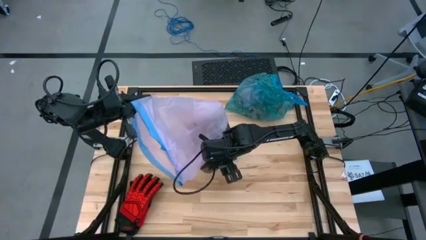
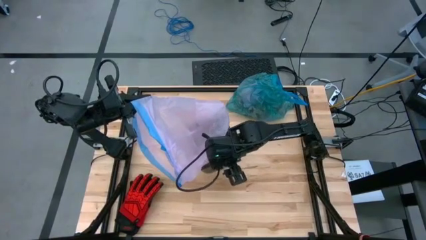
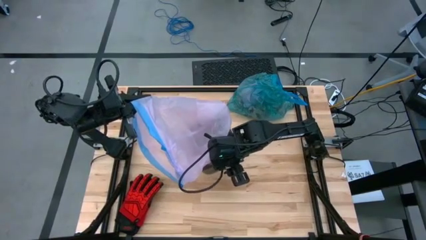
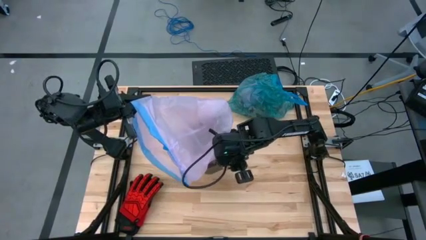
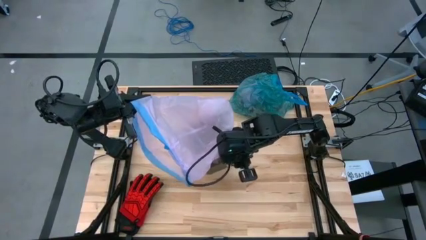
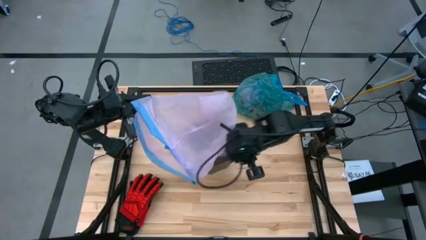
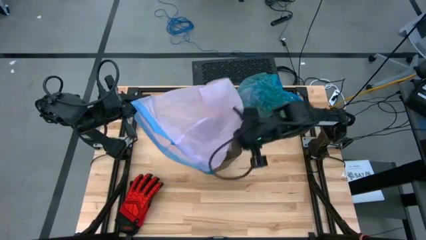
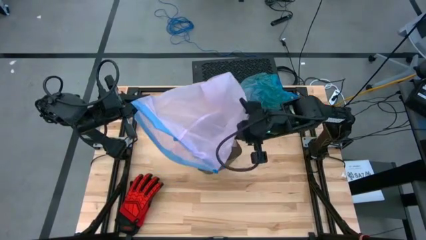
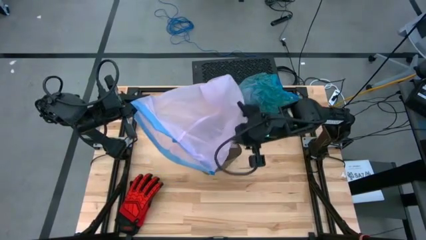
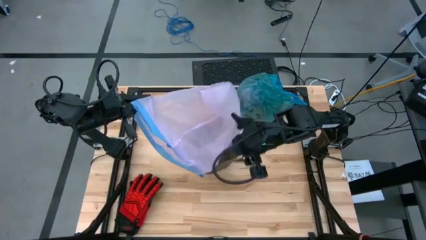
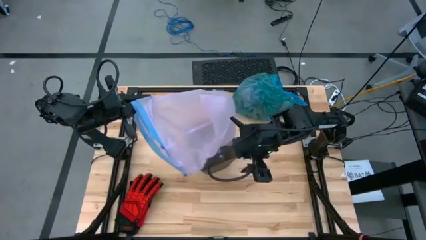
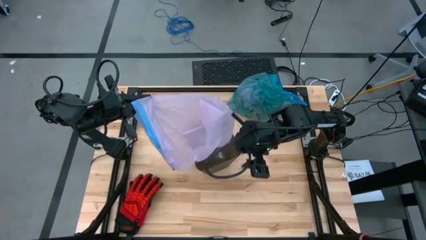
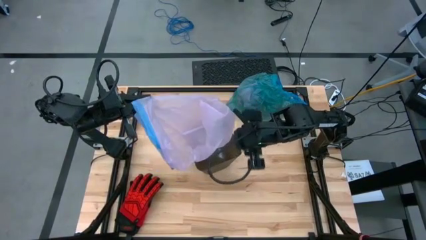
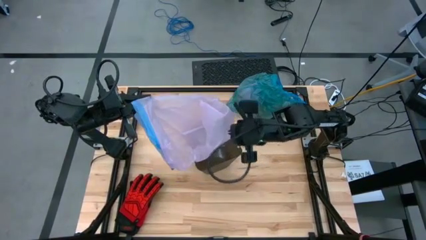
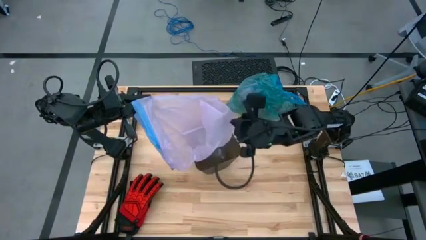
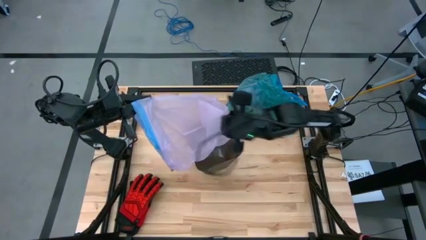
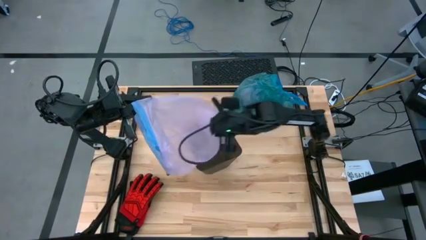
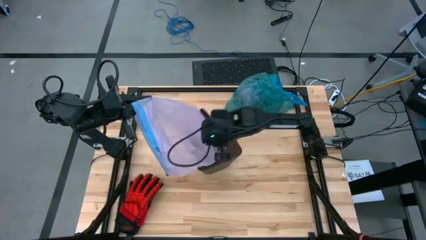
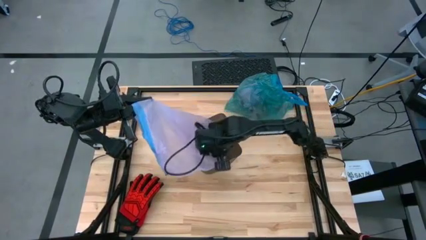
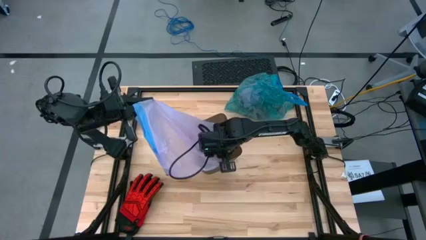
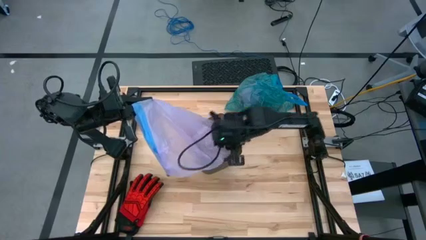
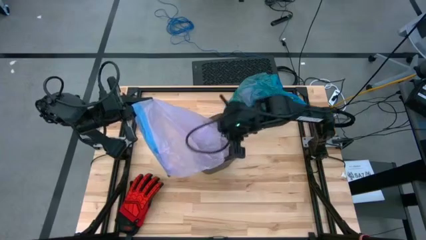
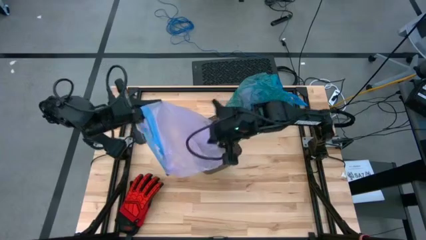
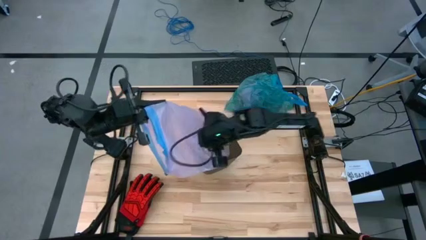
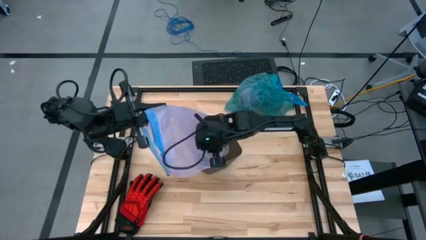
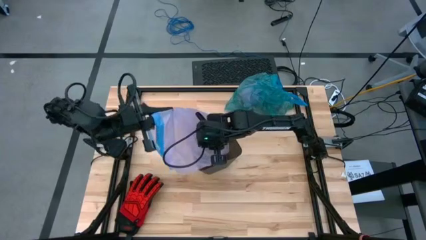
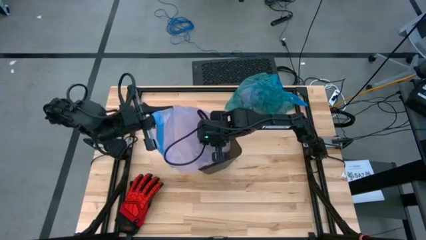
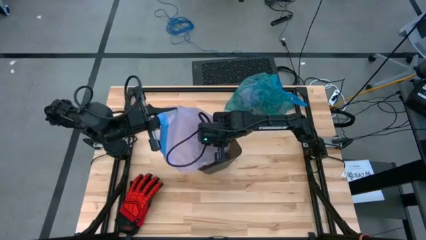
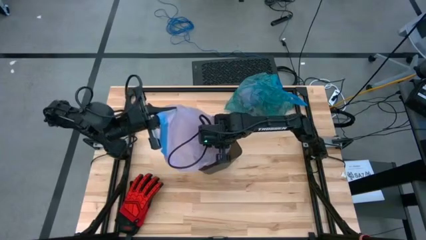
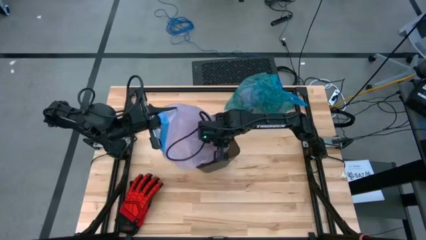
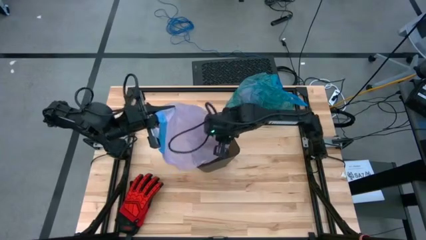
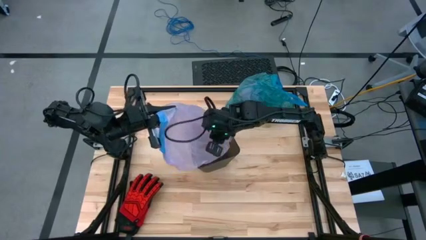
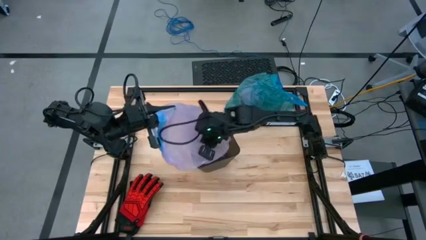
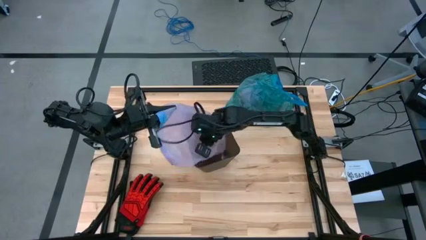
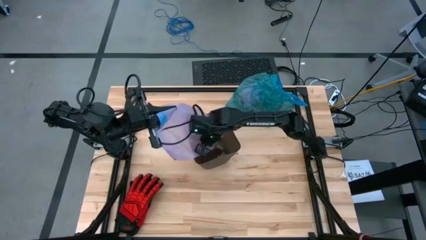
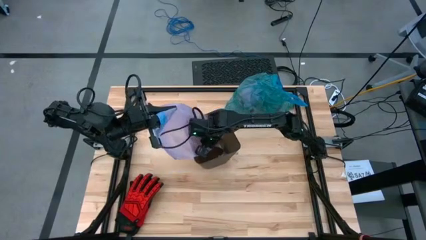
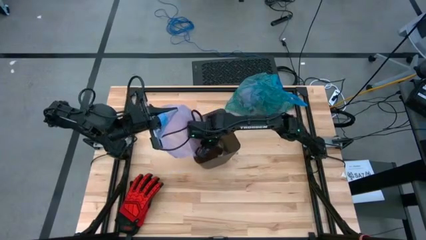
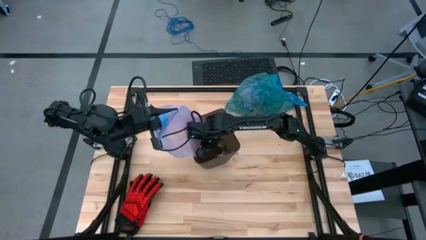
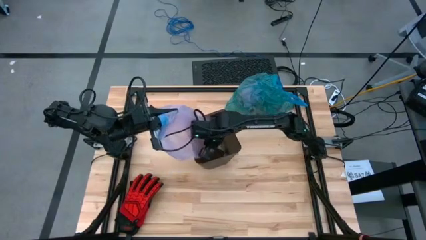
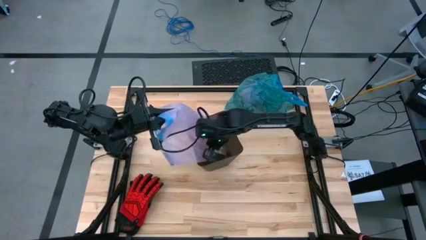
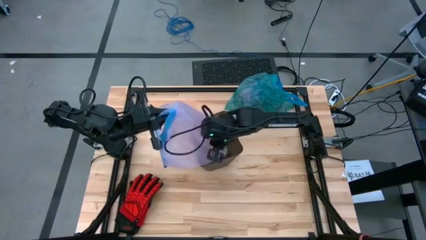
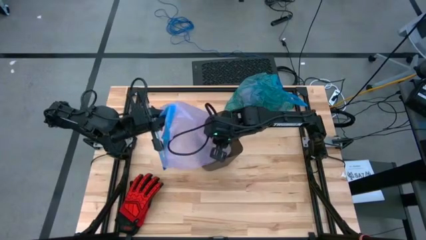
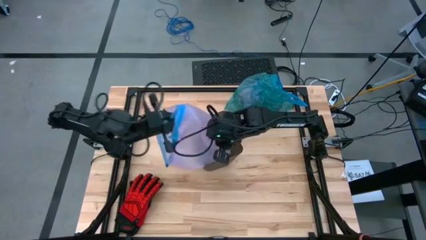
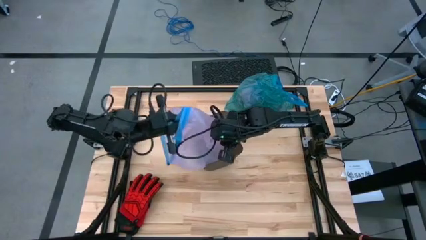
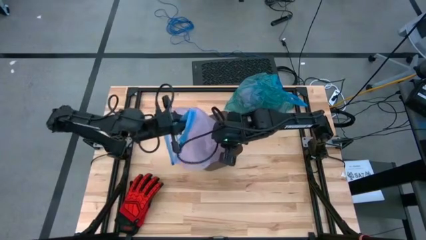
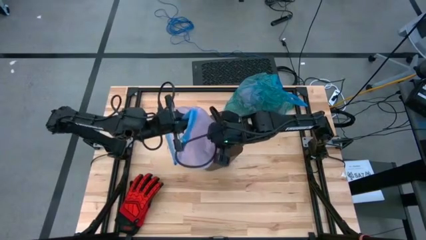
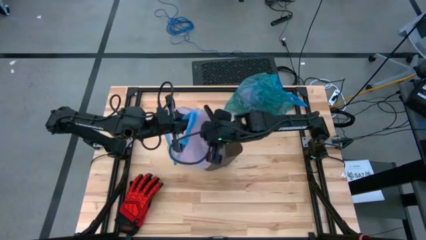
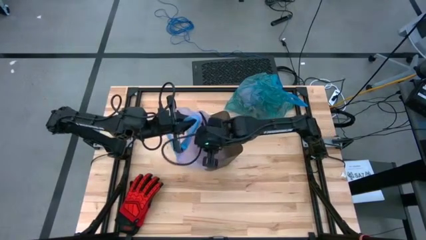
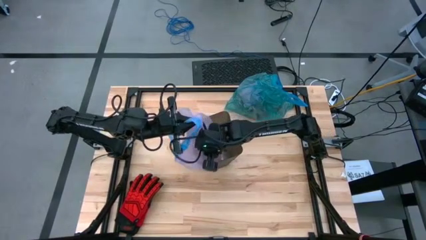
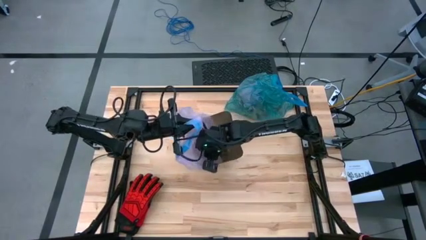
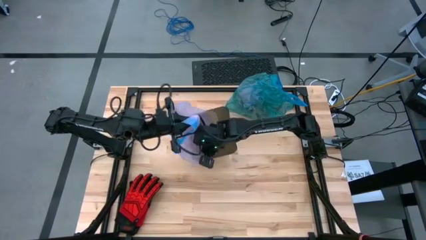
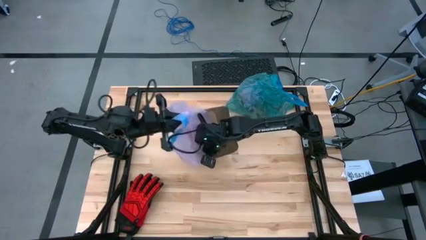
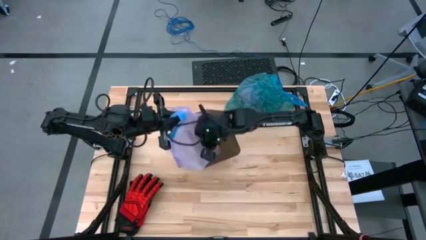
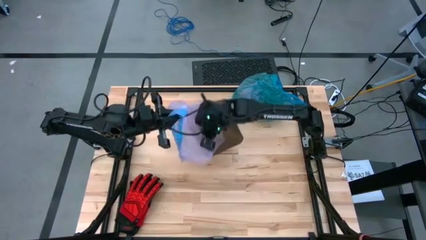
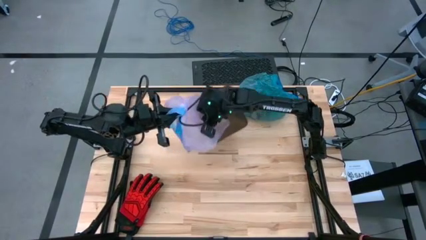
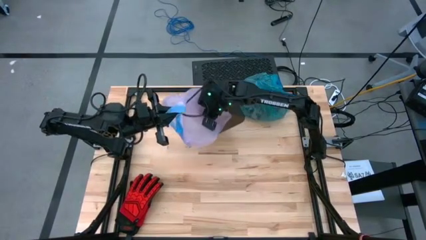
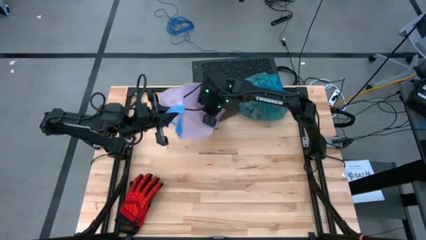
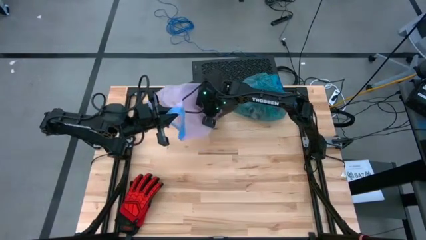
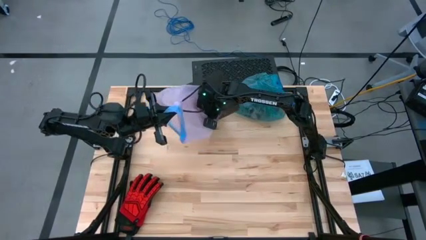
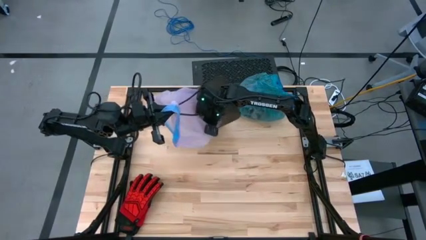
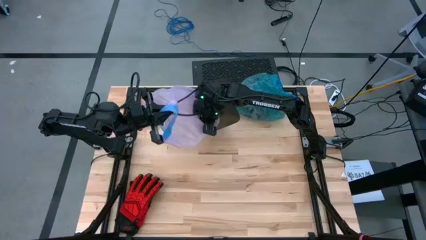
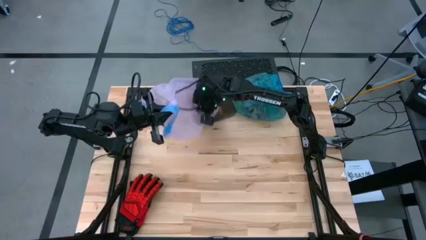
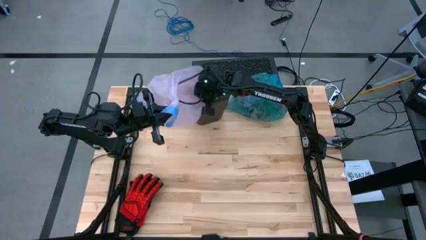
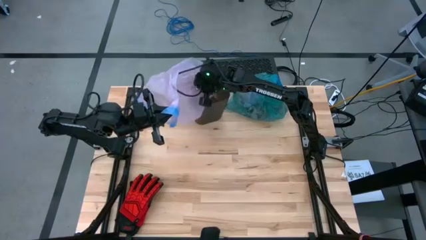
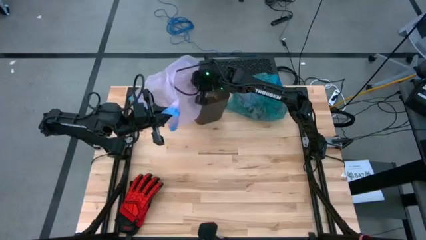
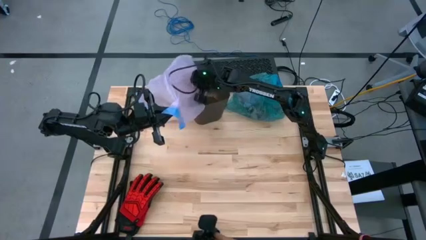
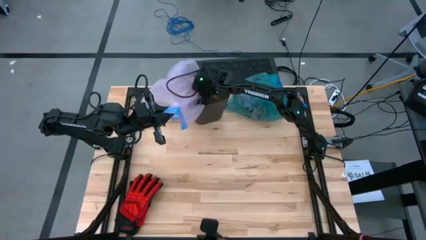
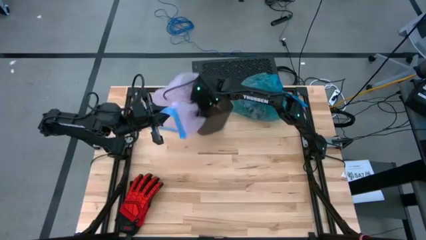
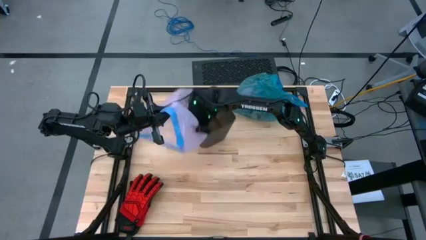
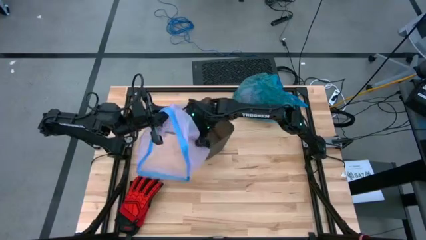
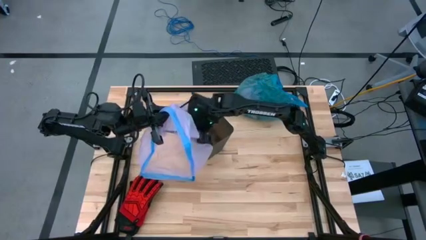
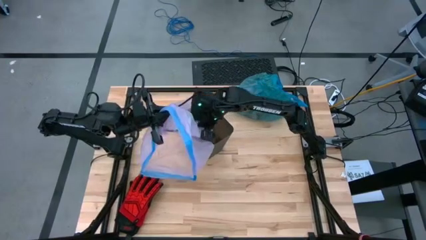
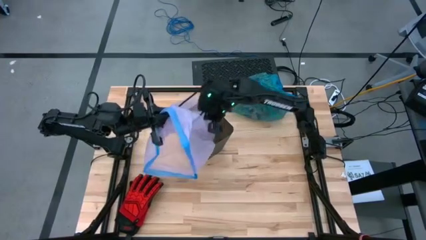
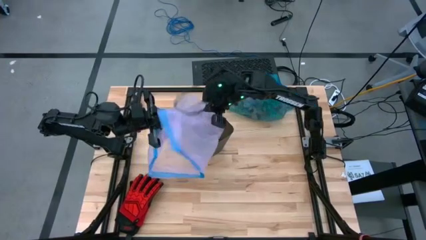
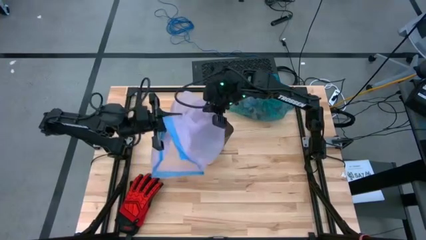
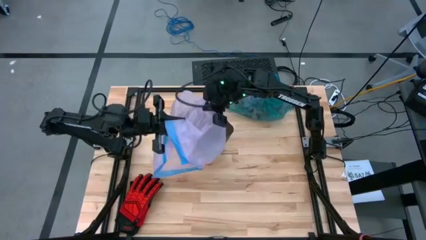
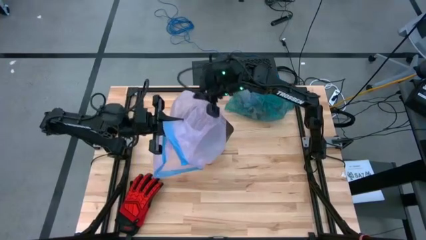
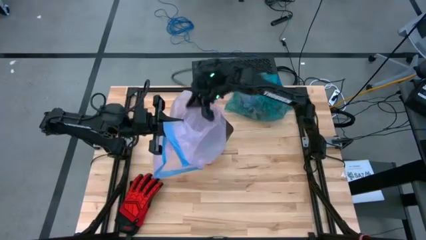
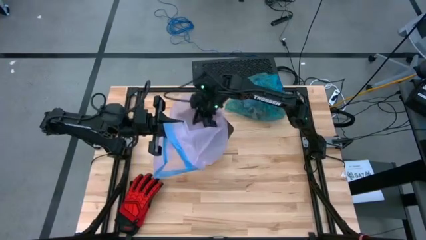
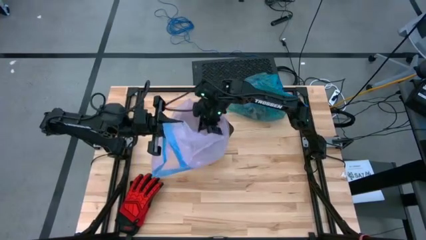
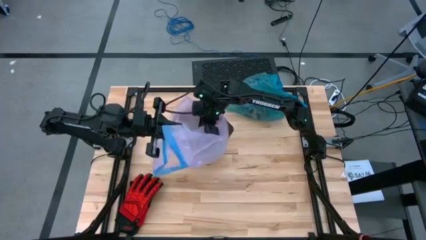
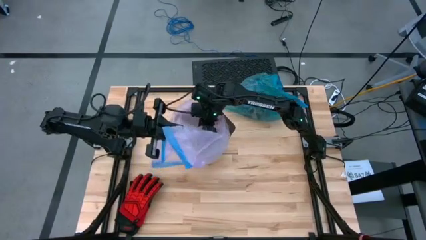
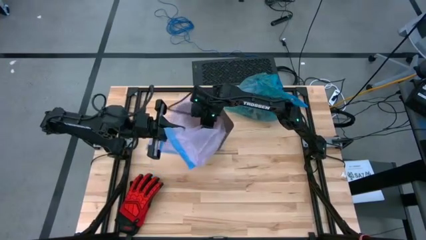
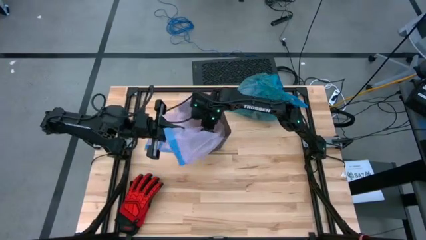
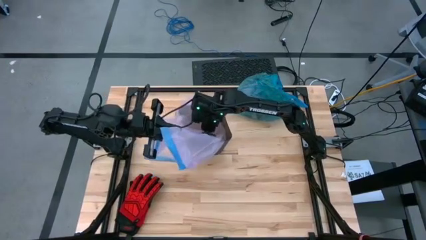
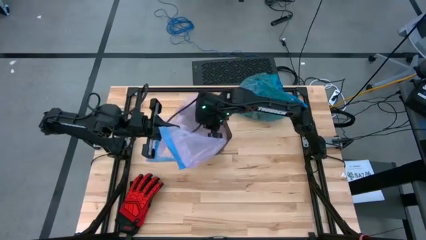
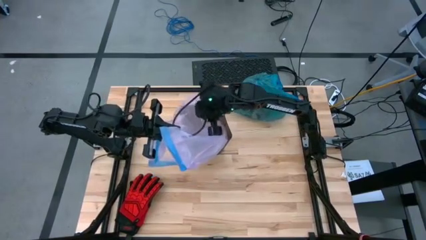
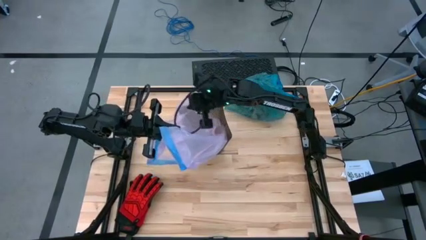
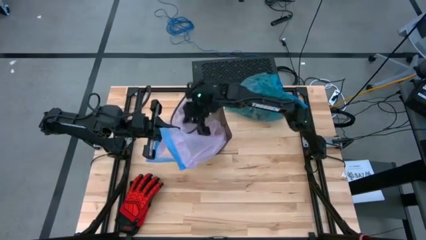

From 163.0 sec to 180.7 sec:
Task: place trash/remove bag and relplace
Put the pink trash bag into the trash bin
